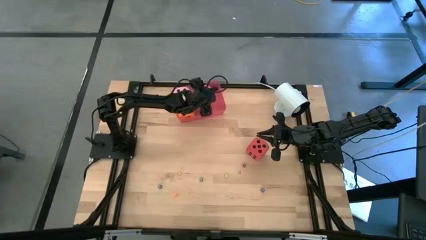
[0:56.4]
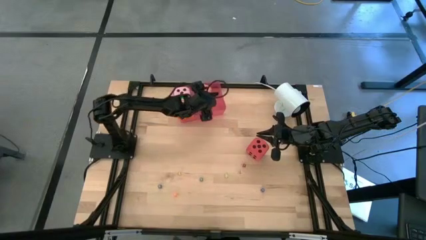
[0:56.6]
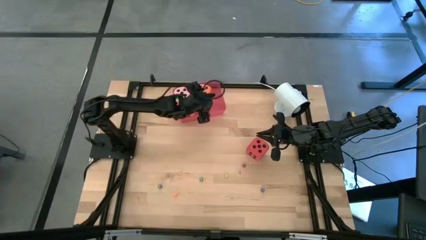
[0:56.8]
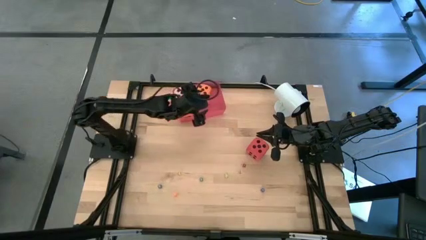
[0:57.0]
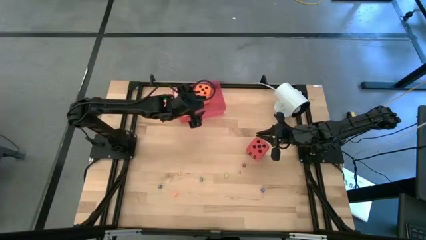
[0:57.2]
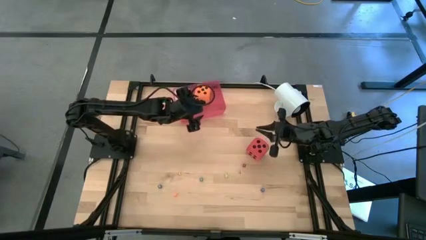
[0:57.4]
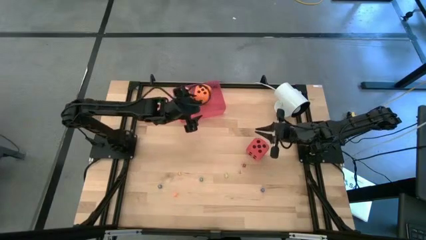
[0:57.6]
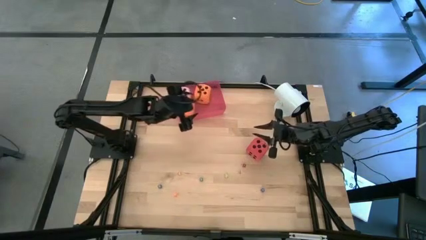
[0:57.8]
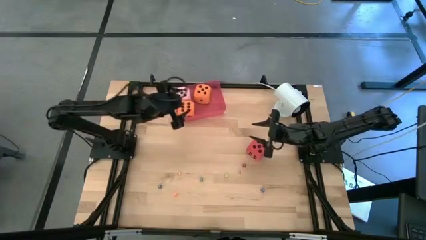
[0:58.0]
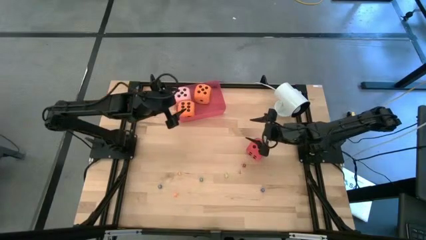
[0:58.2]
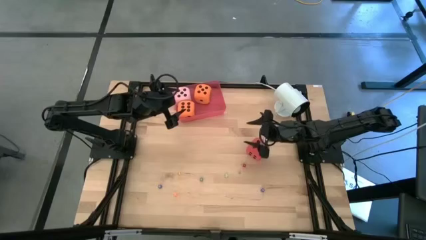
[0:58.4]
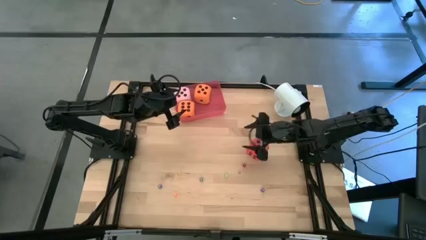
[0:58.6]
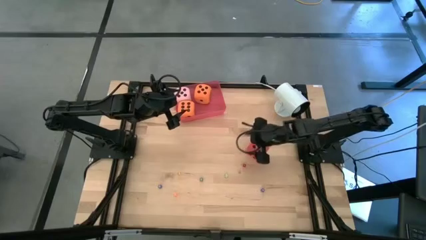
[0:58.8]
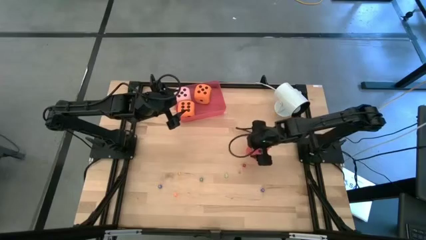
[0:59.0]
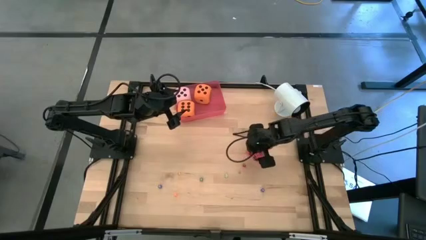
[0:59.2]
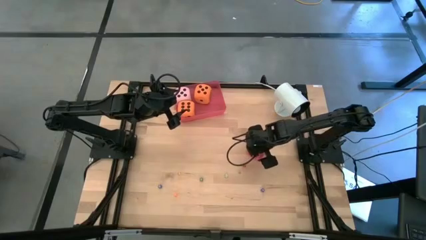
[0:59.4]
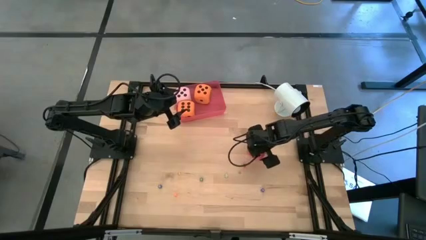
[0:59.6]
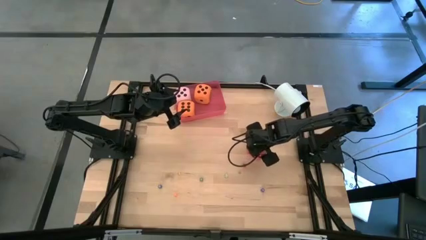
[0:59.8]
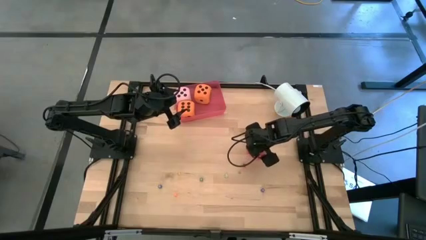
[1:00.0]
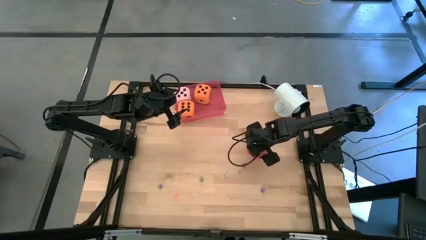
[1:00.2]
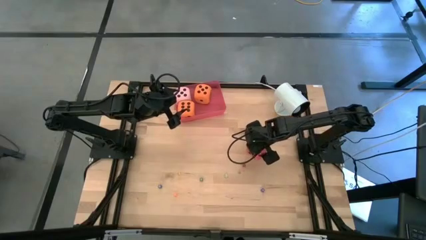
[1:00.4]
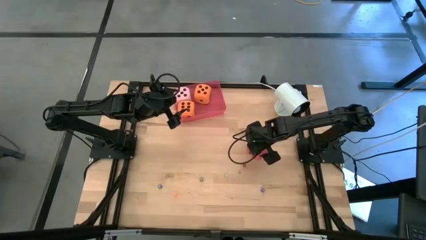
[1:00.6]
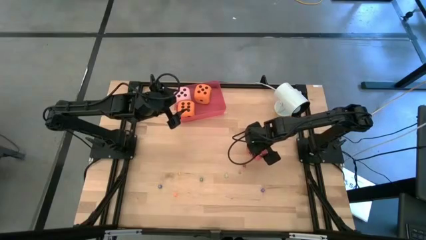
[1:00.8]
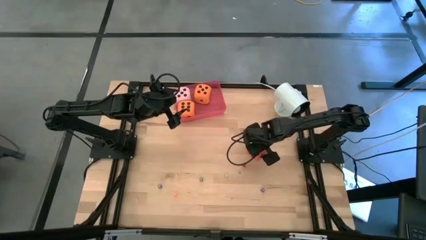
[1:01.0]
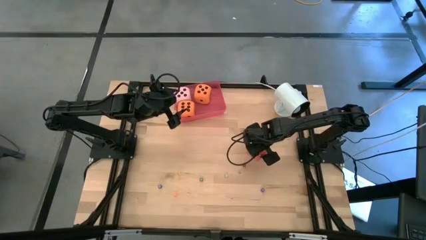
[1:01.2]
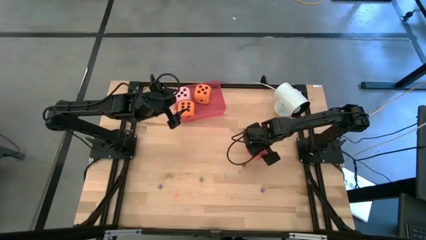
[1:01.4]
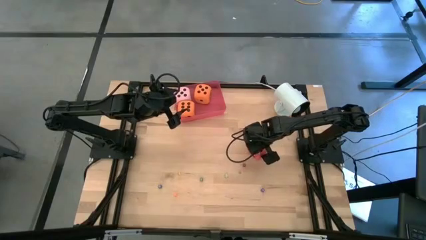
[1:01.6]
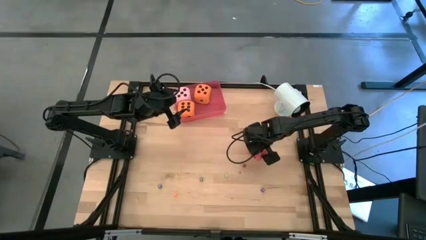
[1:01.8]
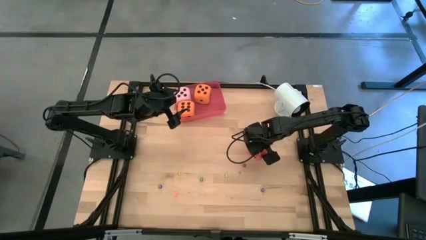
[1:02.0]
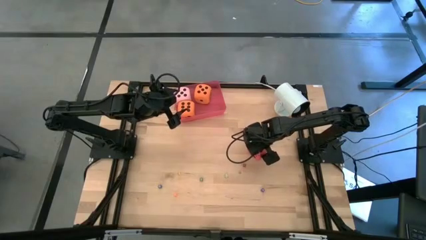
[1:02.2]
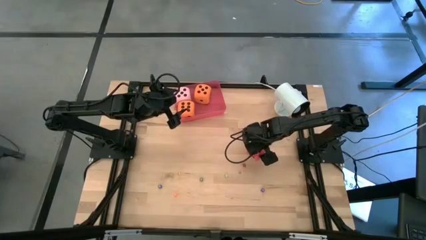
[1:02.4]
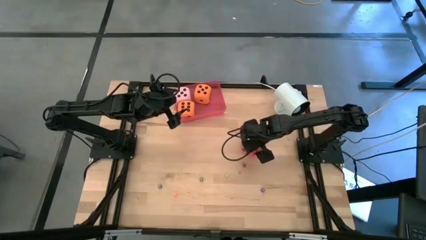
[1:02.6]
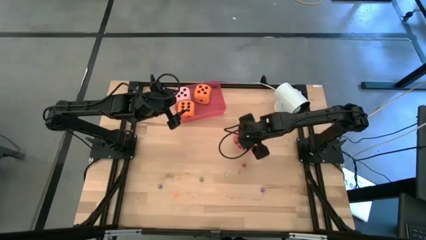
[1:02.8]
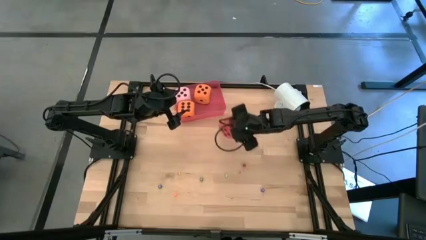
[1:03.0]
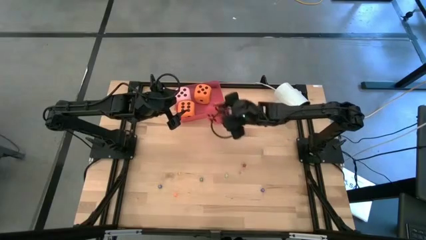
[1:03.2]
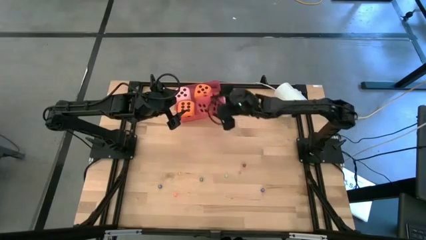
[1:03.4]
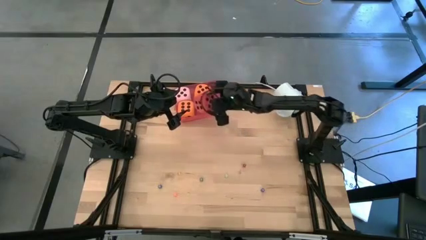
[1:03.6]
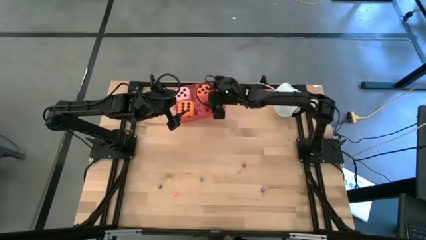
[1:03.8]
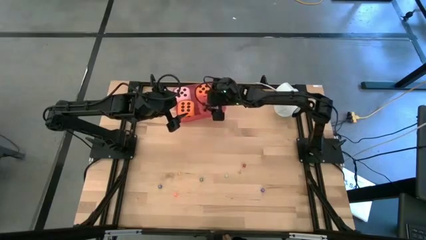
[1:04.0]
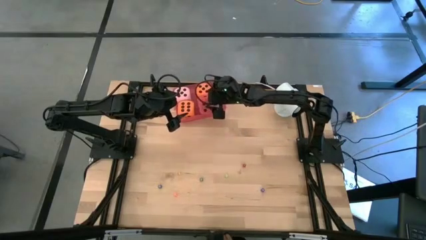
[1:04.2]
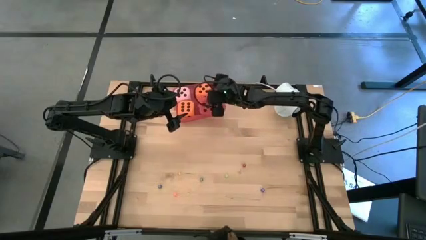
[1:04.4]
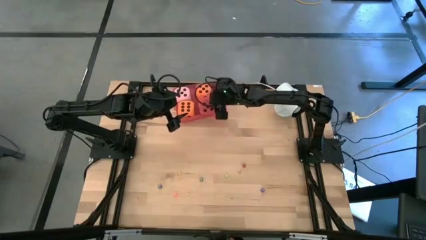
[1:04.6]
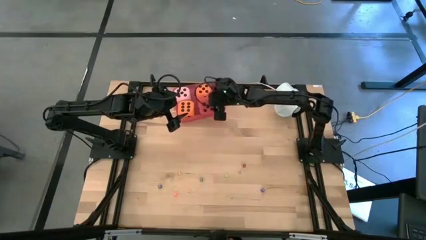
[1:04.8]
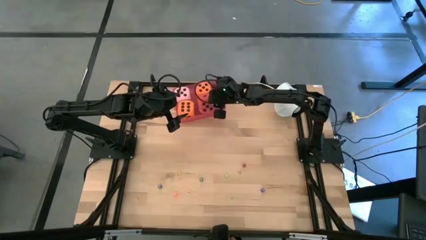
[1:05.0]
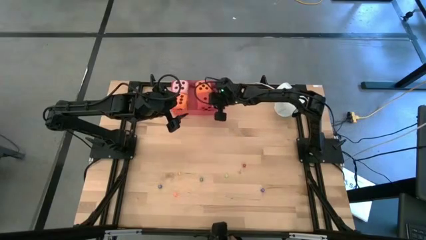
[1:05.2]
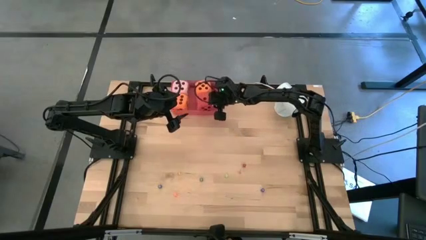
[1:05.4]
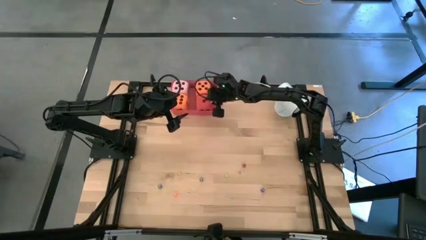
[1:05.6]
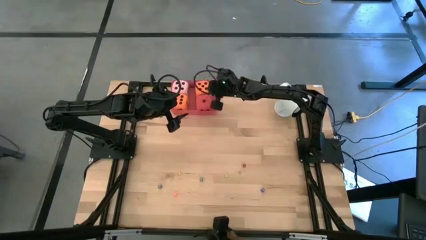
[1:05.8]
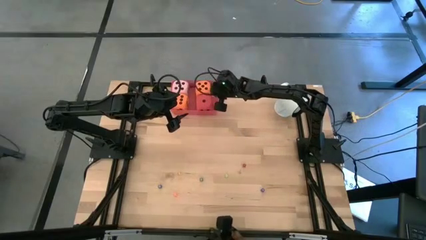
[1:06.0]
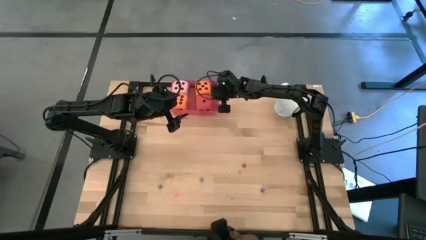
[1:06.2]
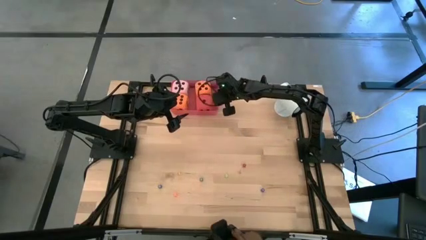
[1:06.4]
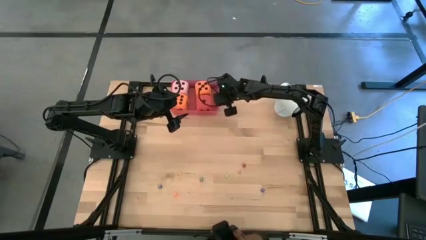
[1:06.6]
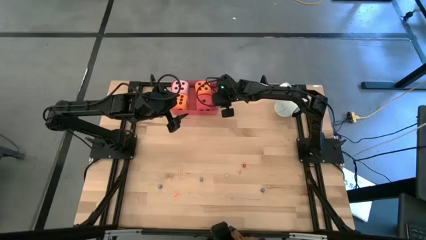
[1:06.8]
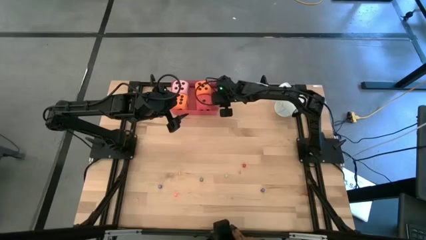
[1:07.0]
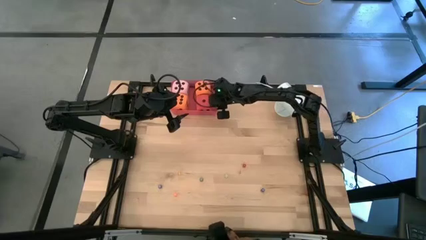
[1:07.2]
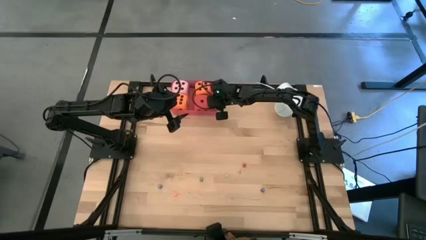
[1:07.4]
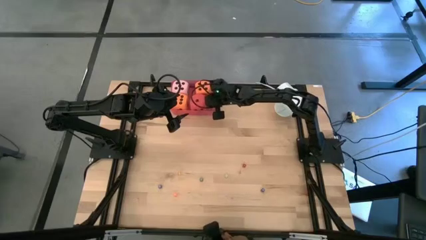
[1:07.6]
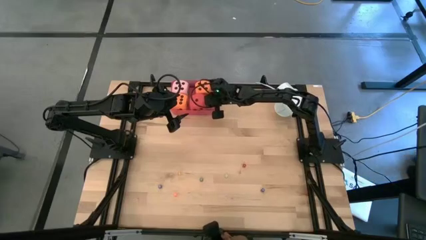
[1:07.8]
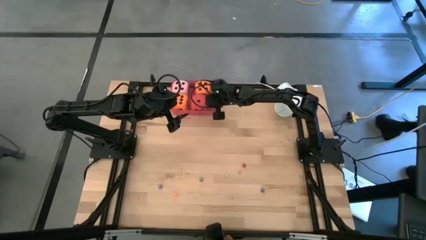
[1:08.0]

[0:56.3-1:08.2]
Task: Pick & Place Dice
Put the large red die into the red bin

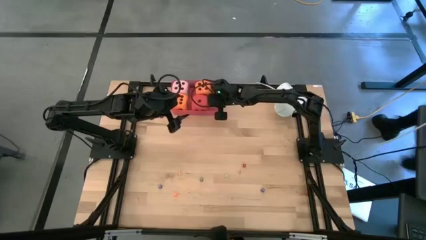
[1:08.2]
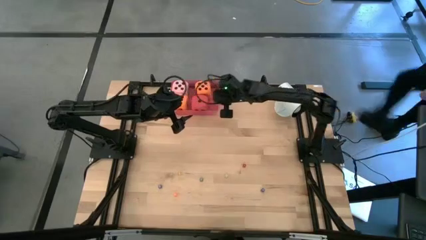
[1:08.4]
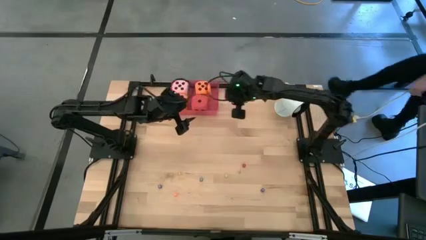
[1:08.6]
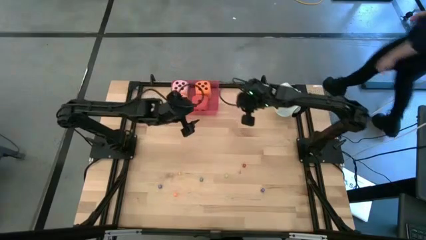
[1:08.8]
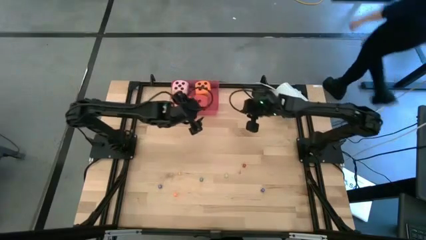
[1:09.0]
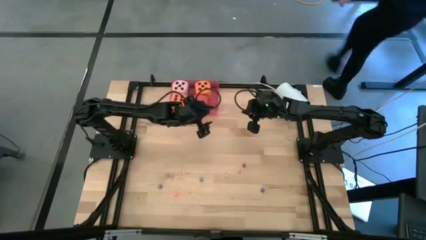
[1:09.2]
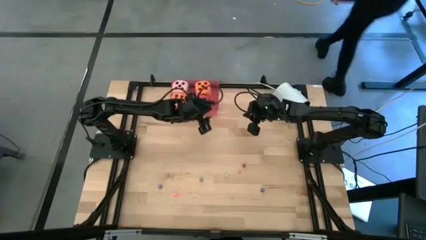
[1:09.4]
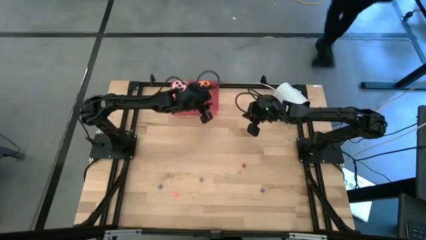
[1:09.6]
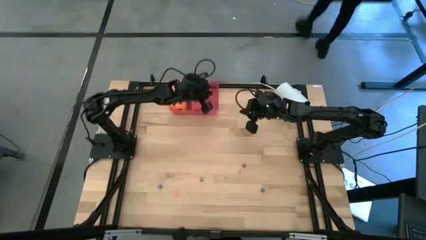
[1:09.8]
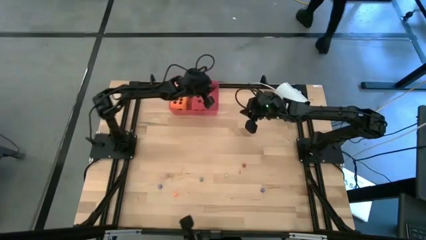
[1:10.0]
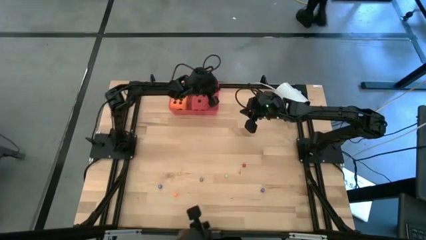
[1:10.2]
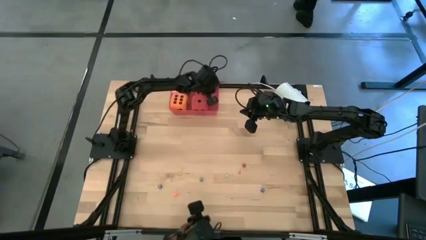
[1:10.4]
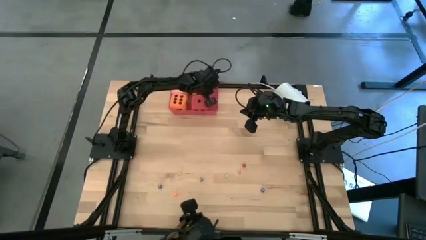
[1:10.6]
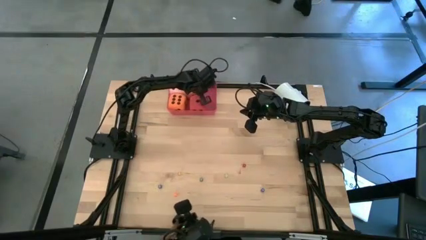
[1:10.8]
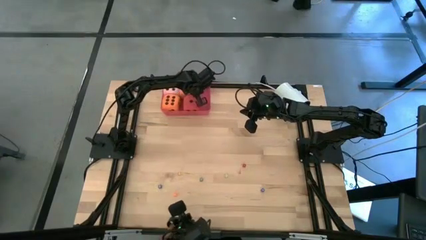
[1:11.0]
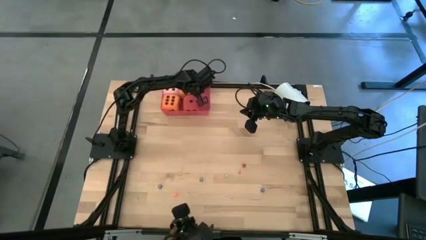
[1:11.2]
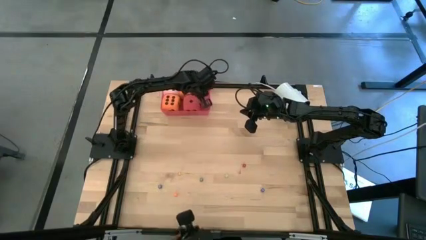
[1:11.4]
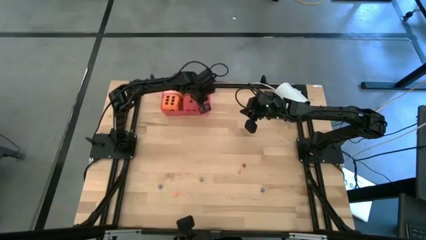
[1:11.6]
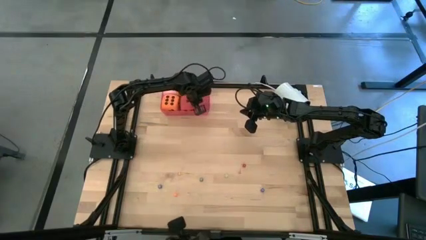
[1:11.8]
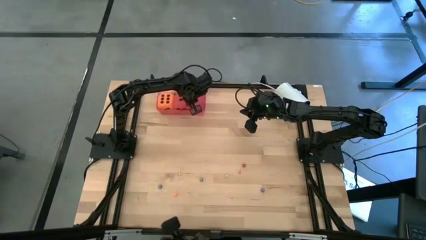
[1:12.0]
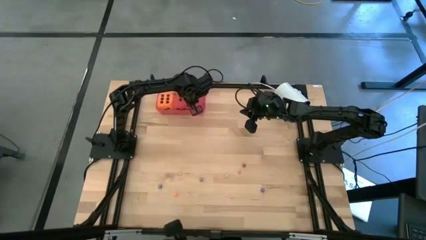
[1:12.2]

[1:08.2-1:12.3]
Adjust the large dice in the red bin

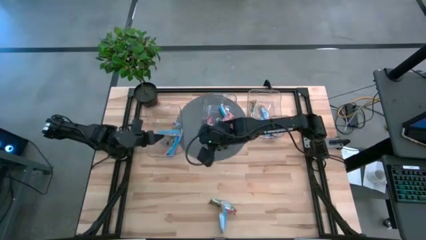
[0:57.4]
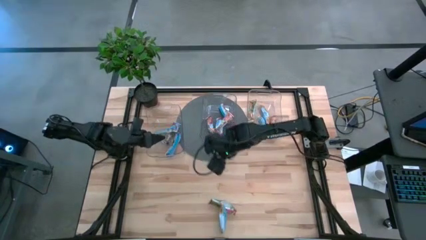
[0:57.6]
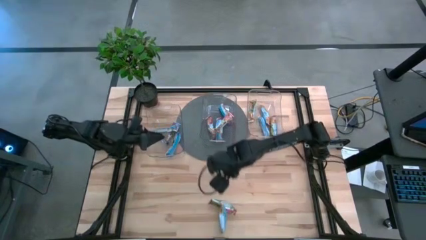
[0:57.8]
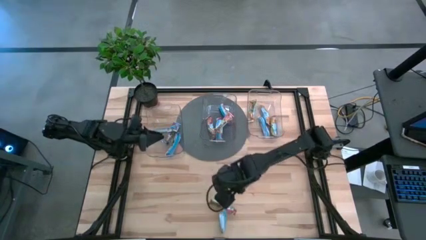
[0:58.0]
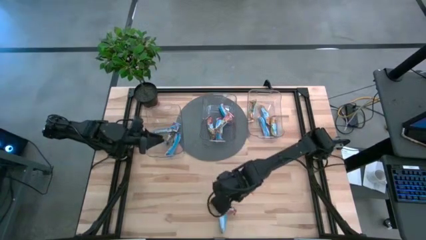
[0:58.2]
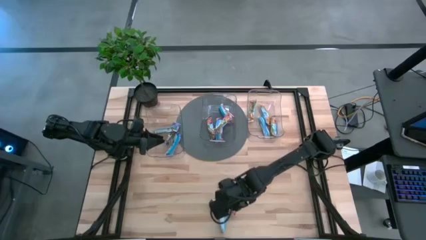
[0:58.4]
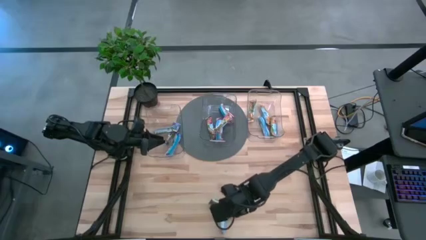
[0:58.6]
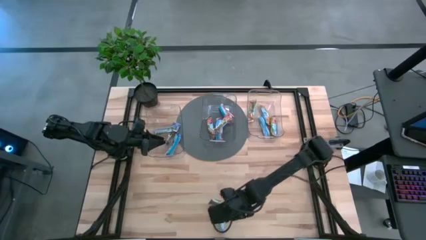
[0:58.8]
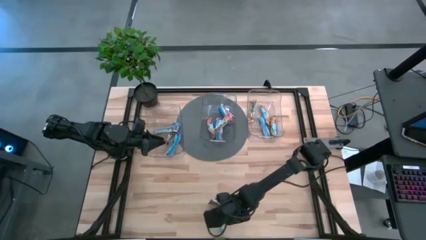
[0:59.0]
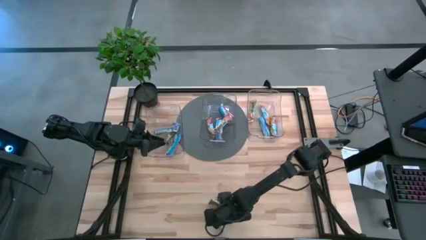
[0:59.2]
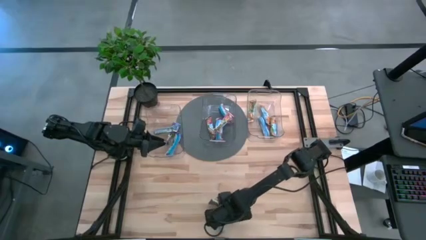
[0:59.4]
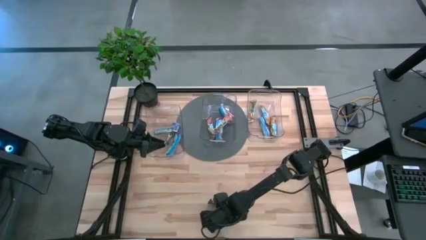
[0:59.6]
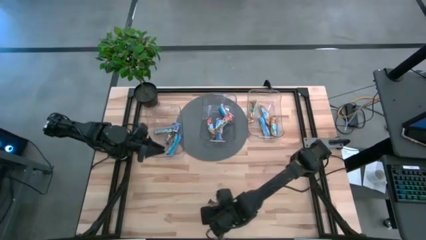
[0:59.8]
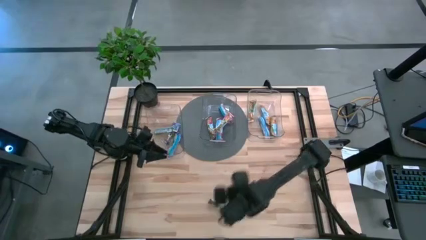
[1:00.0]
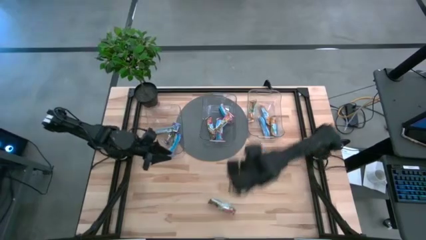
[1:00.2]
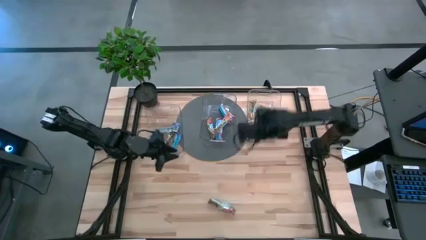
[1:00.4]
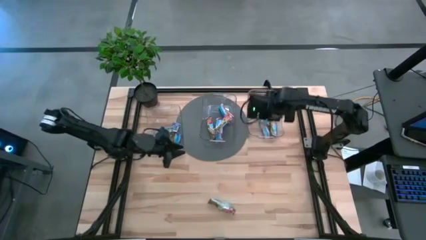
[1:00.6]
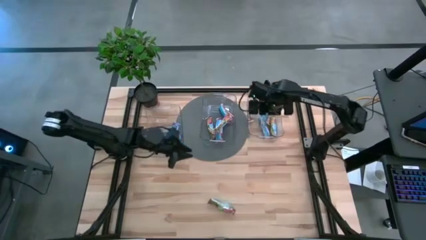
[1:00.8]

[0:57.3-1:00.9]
Task: Pick and place Granola Bars by type
Put the orange granola bar into the right transparent bin
